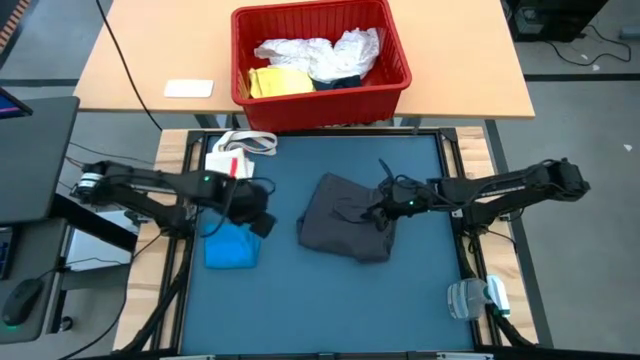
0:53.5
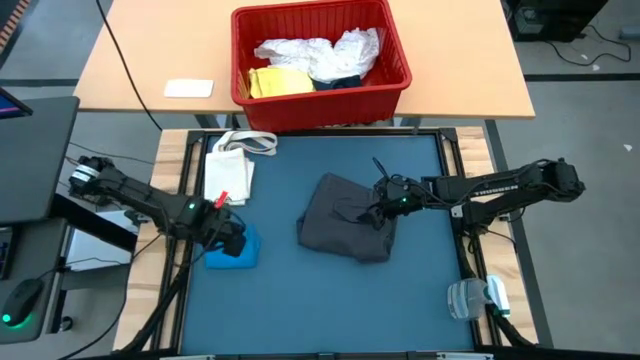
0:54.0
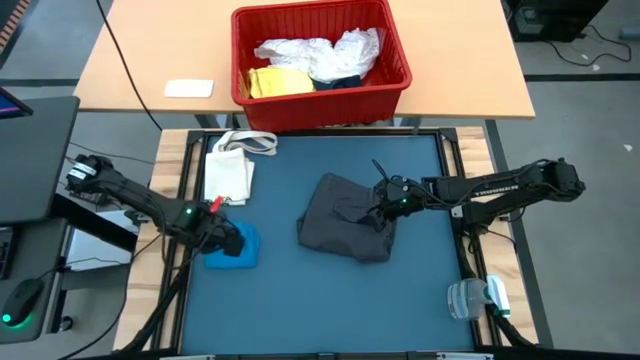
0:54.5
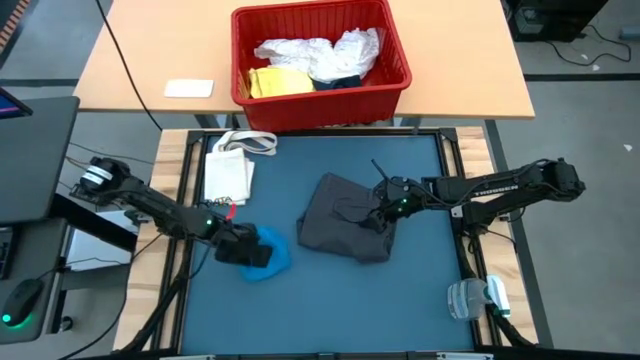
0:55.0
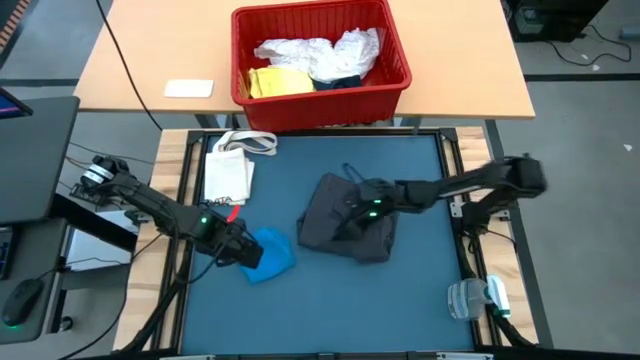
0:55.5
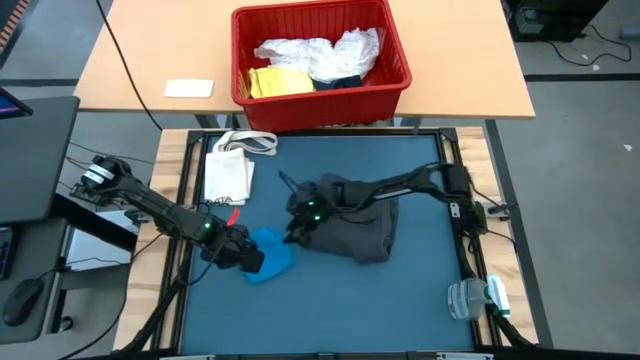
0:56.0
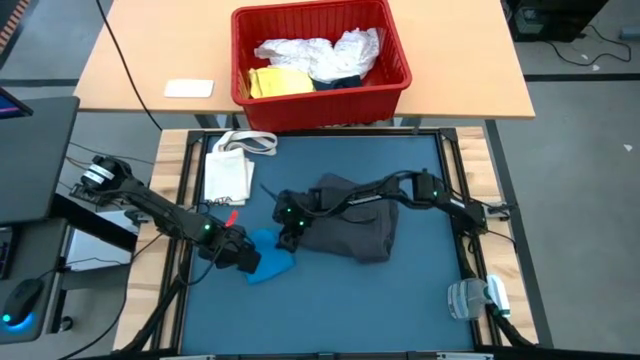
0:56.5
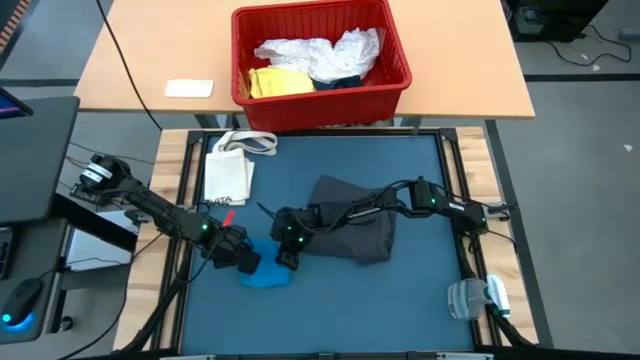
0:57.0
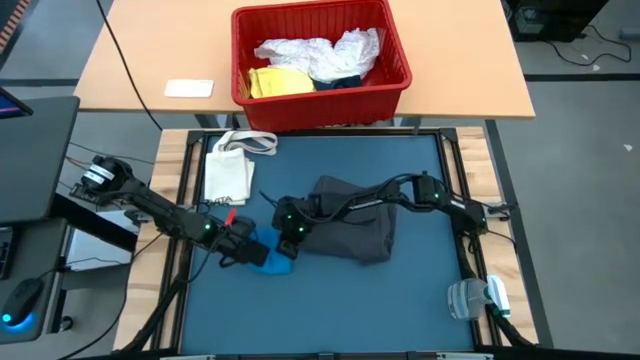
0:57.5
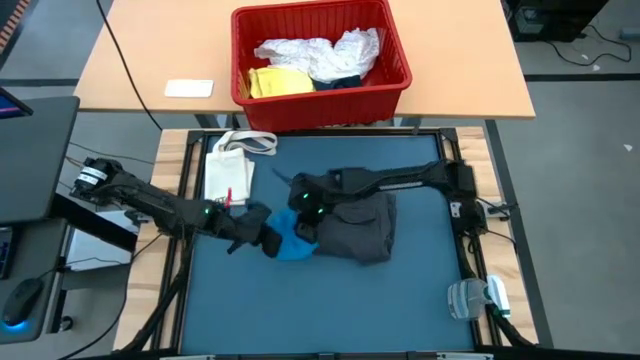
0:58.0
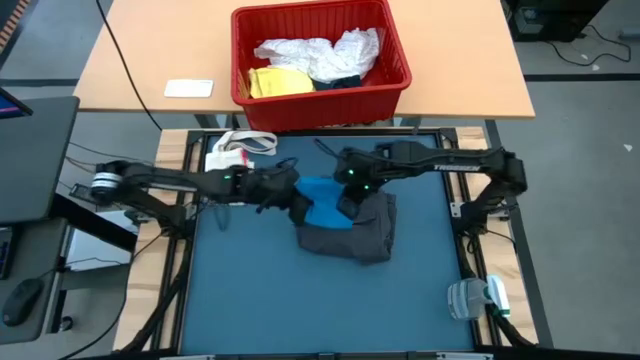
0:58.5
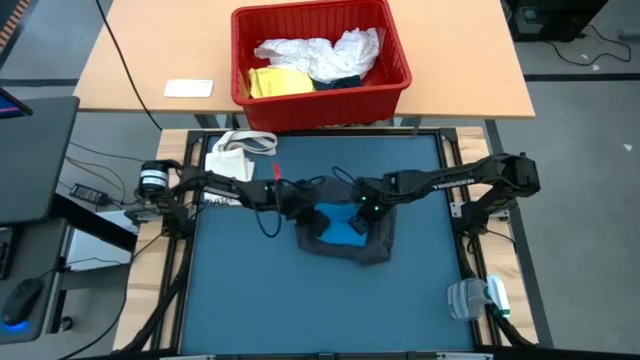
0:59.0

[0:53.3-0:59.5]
Task: Fold laundry
Stack the blue shorts on top of the black shorts

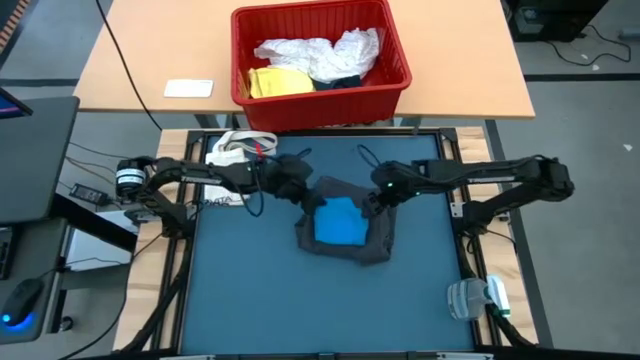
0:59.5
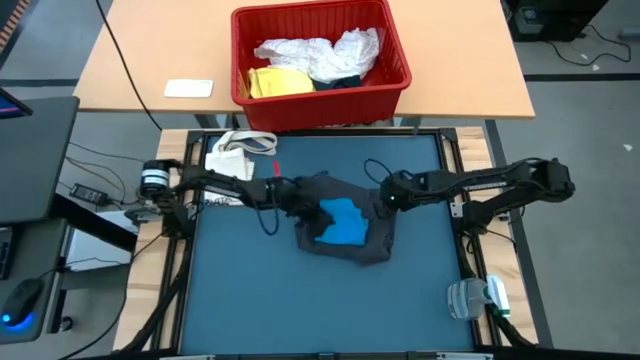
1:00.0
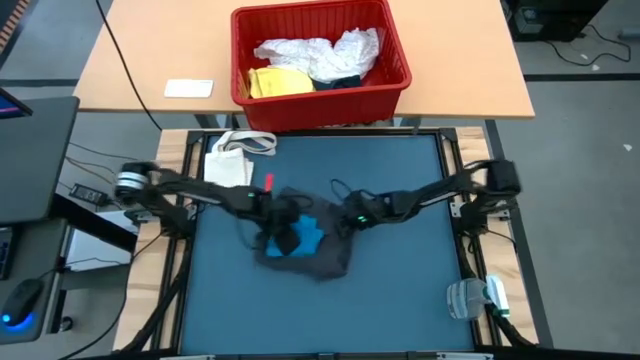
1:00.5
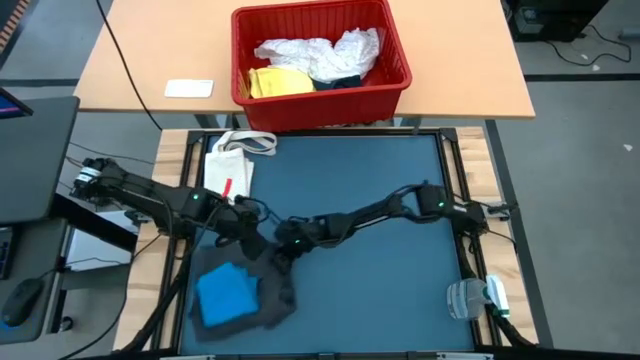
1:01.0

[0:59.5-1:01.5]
Move the folded shorts to the bottom left of the table

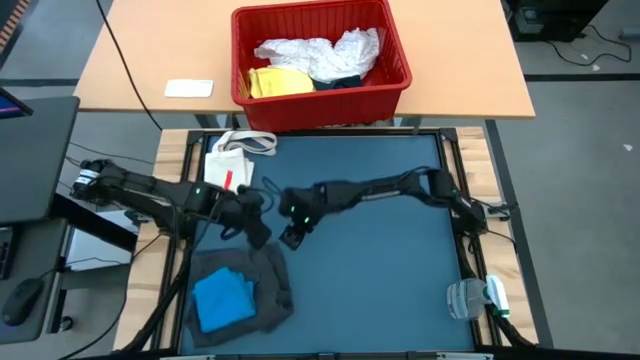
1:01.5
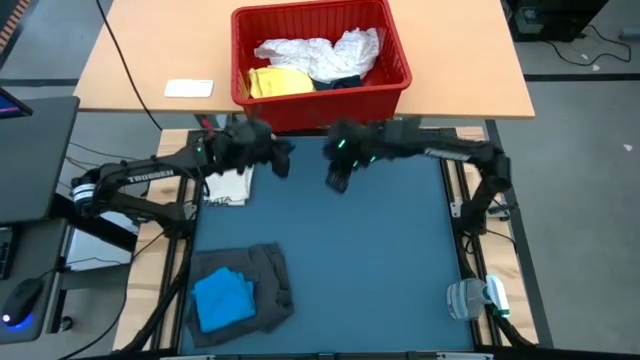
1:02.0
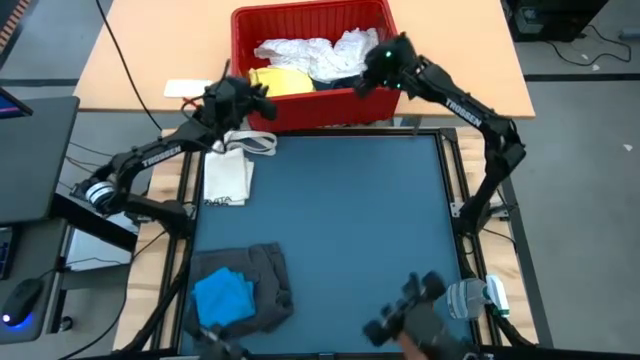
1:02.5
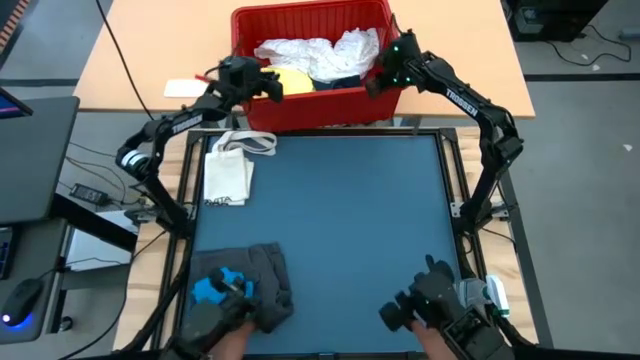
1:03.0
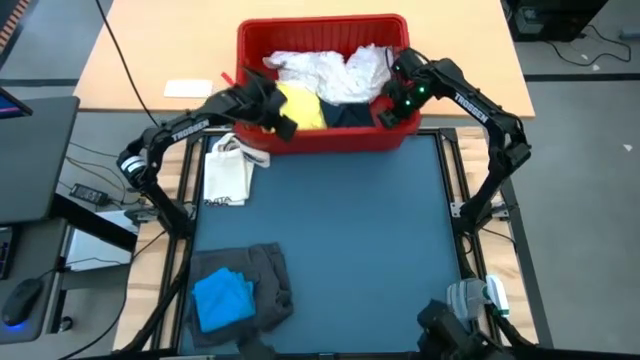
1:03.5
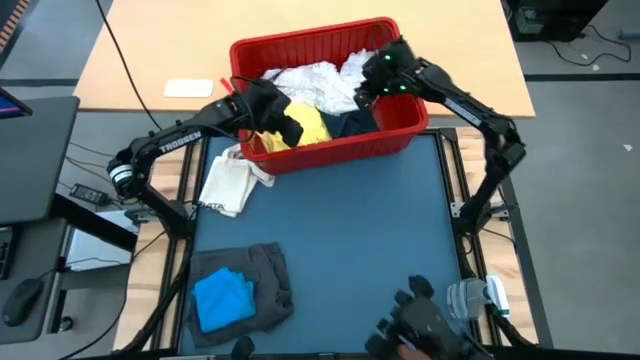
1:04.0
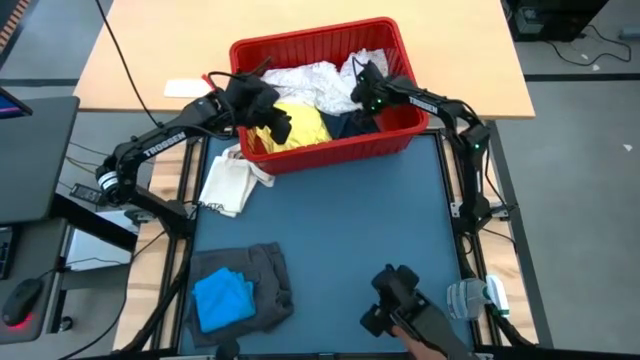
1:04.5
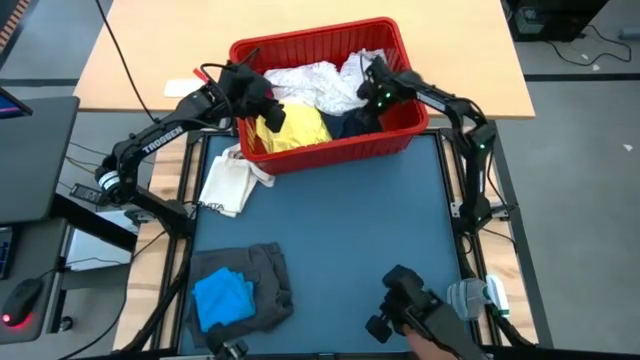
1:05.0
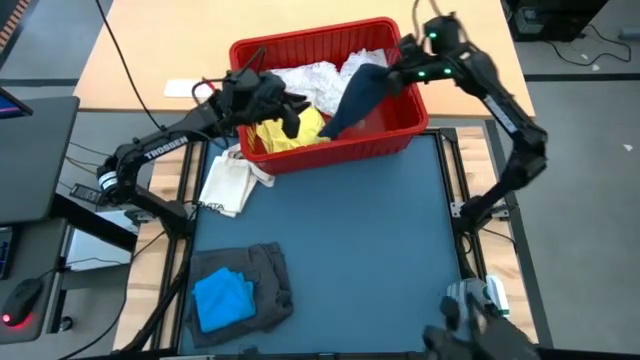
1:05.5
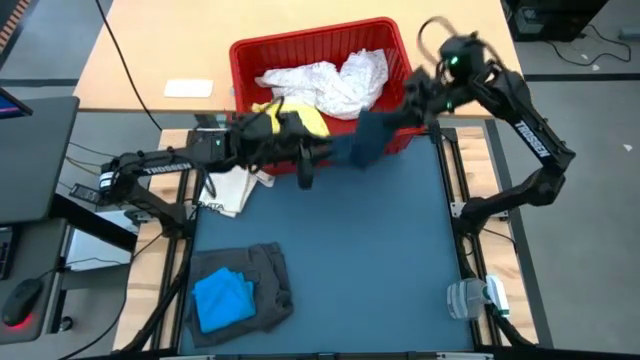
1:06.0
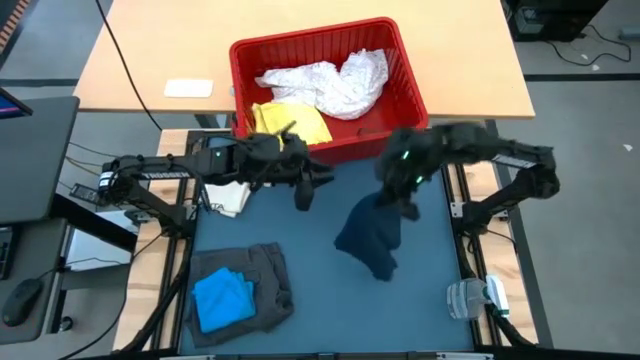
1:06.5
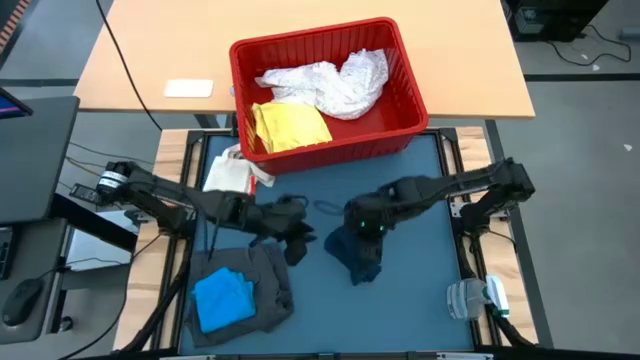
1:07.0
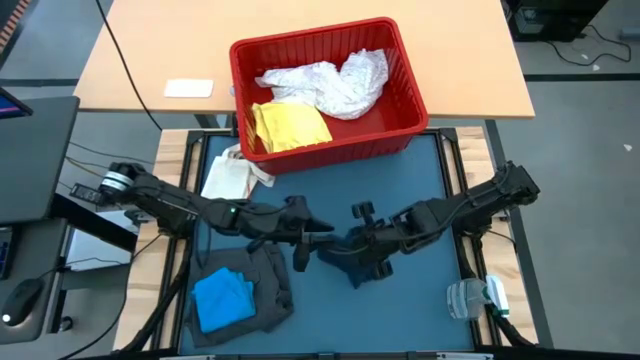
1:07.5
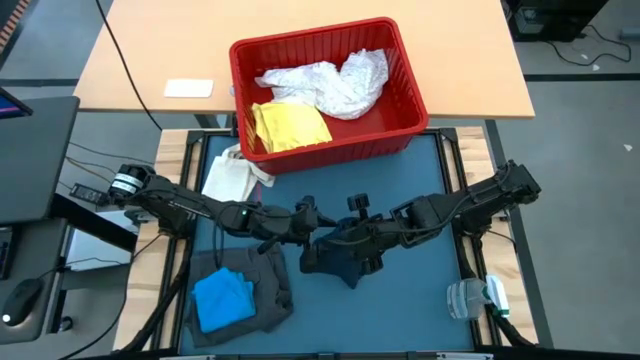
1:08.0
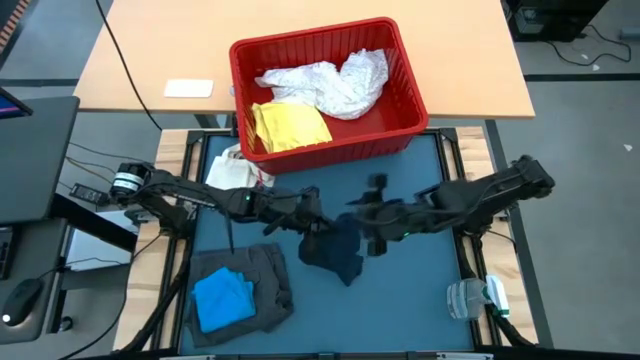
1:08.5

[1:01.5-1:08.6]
Remove the dark blue shorts from the red bin

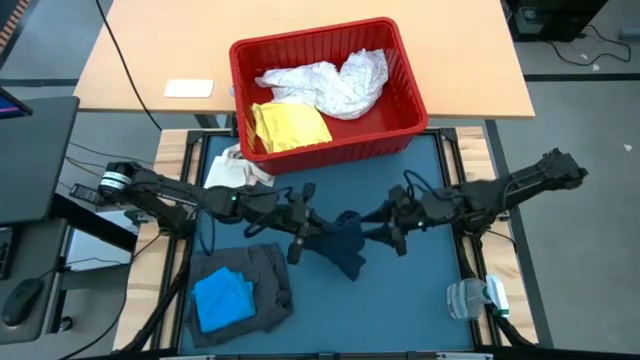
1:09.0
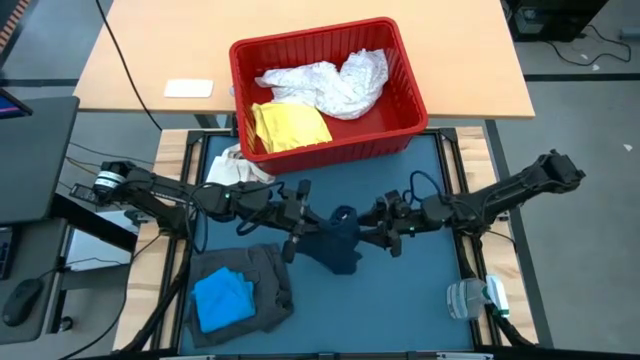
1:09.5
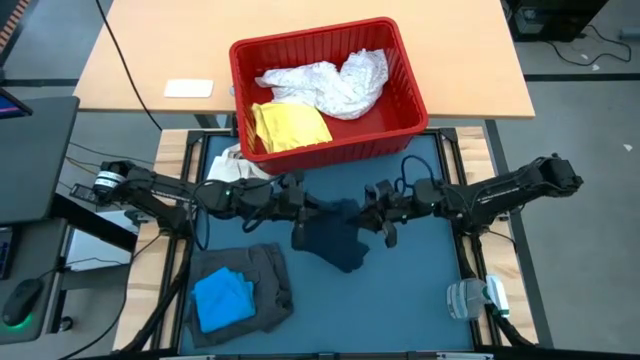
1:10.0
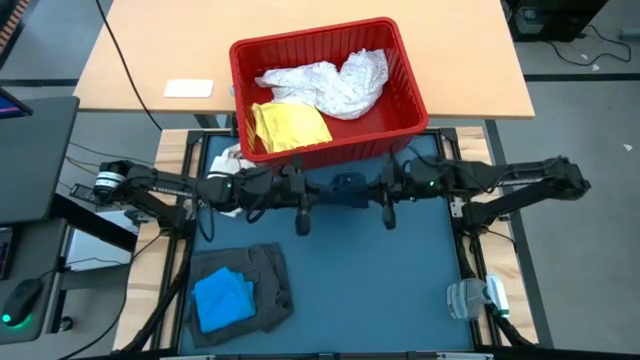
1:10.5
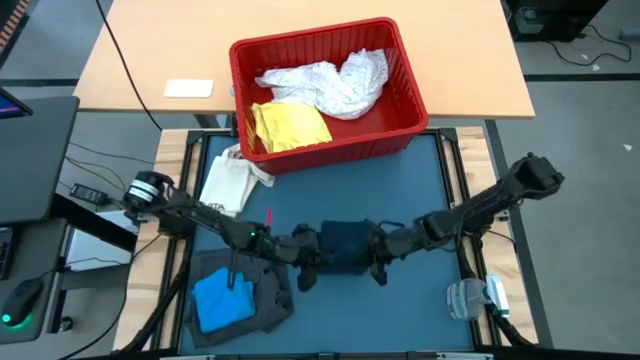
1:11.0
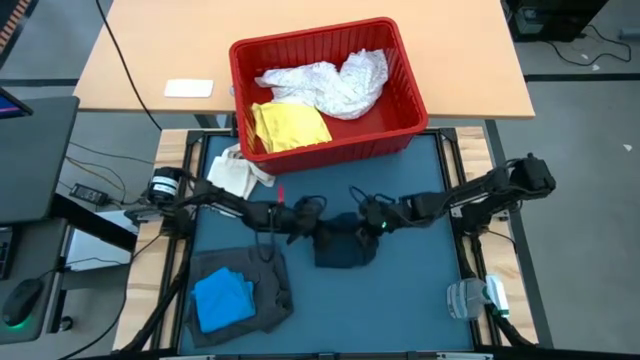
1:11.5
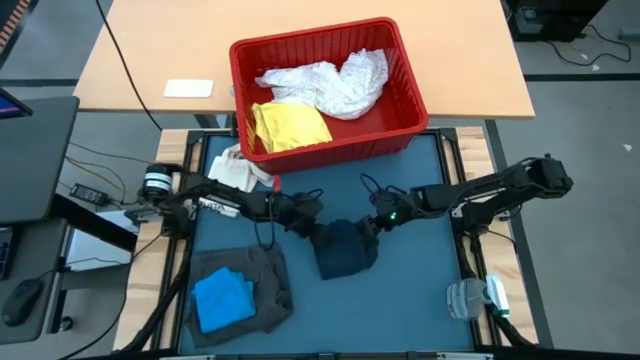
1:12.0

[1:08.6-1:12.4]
Fold the dark blue shorts

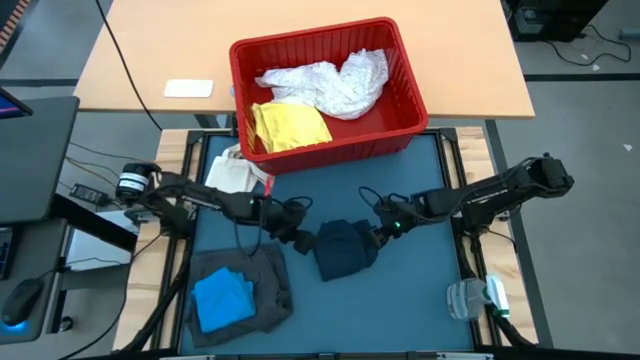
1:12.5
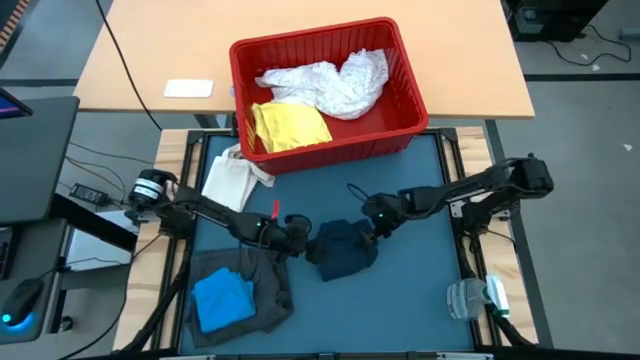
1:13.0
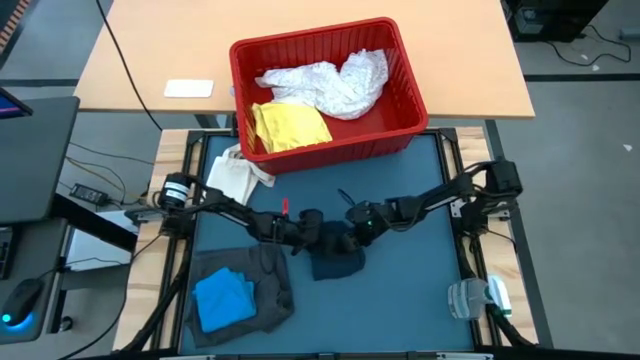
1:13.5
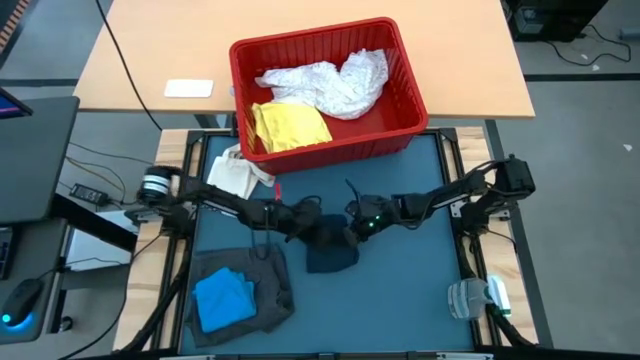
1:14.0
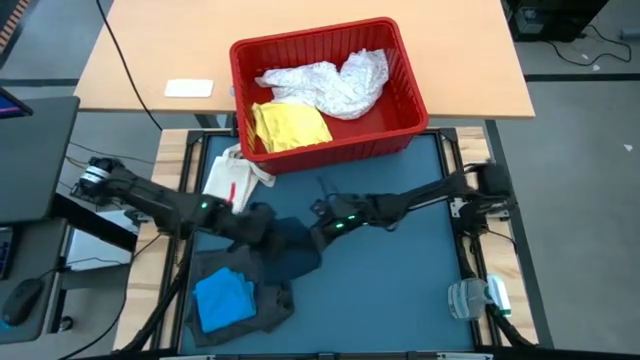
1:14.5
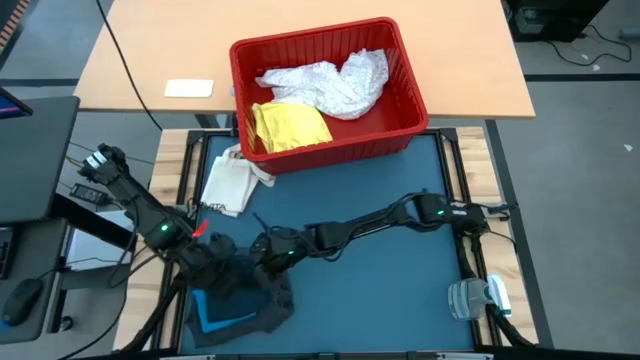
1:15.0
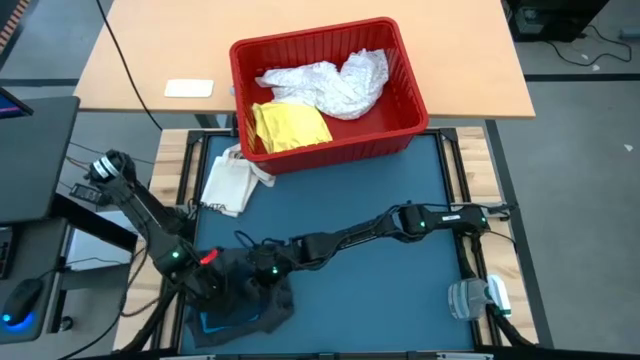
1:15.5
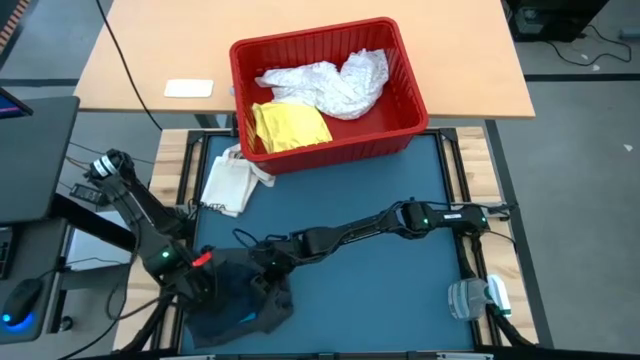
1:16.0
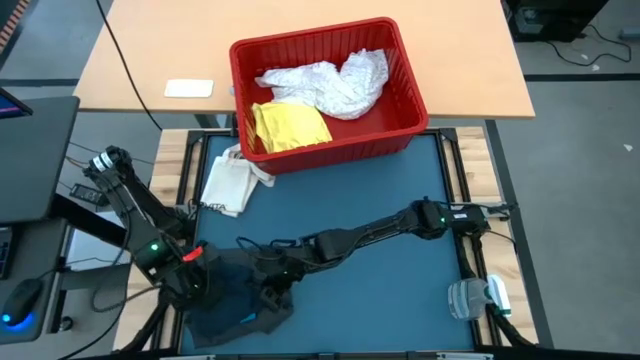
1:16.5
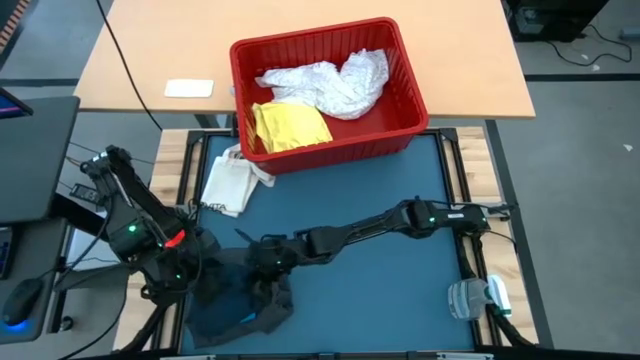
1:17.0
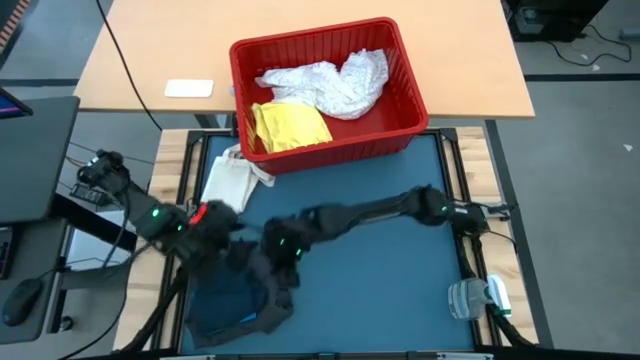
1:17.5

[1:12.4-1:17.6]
Stack the dark blue shorts on top of the blue shorts
